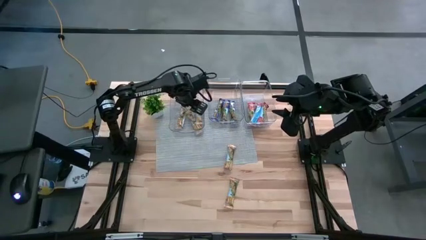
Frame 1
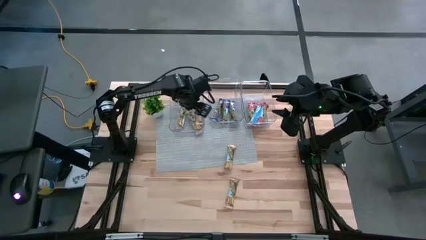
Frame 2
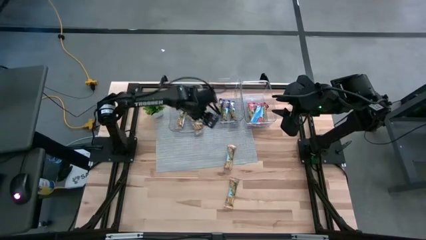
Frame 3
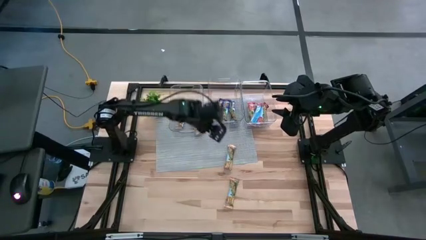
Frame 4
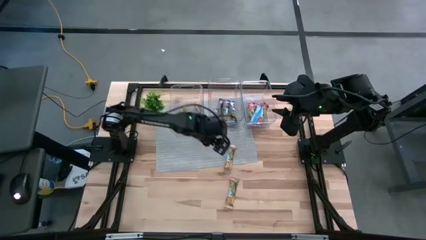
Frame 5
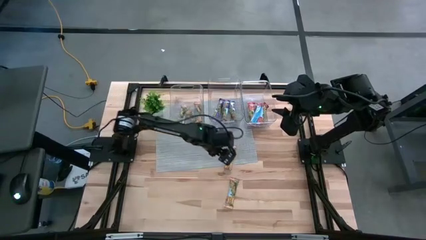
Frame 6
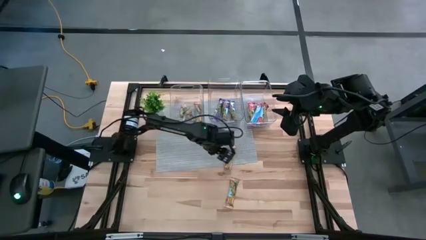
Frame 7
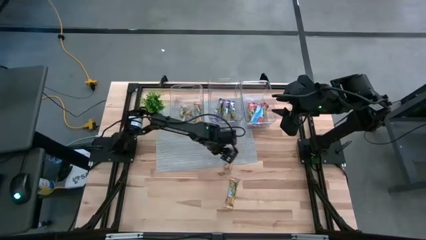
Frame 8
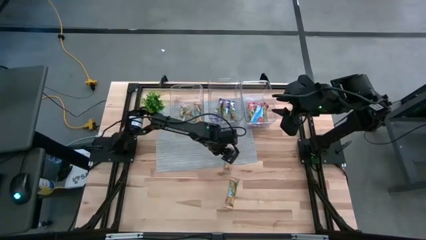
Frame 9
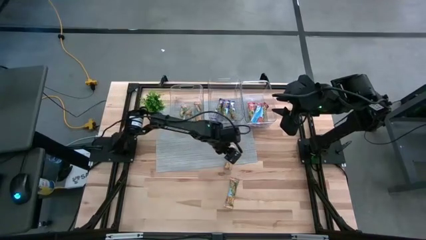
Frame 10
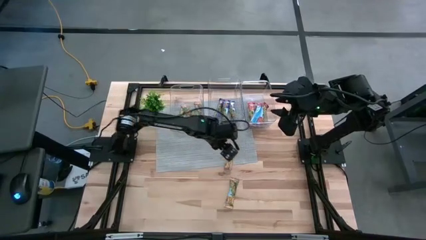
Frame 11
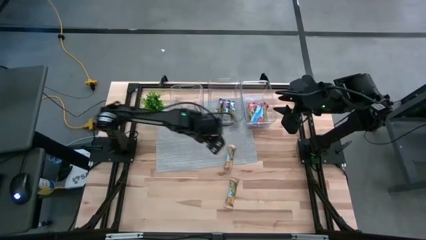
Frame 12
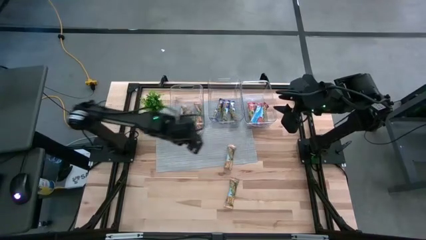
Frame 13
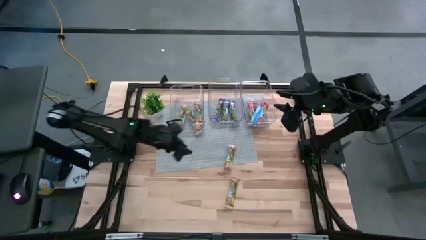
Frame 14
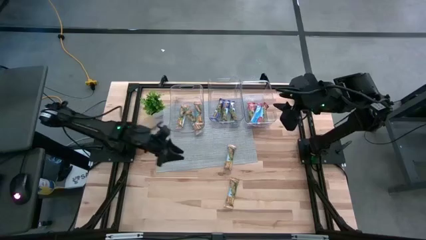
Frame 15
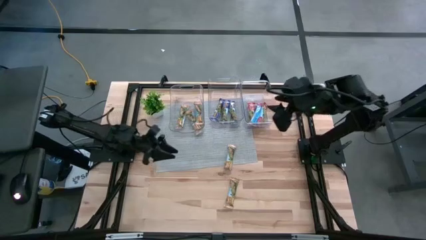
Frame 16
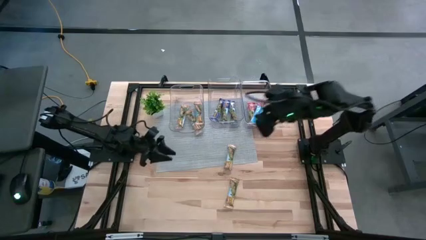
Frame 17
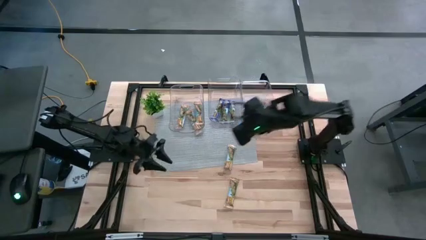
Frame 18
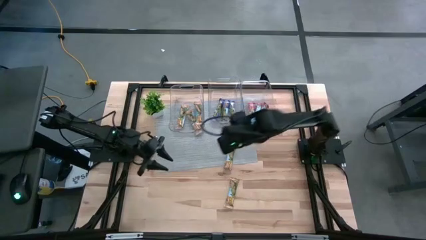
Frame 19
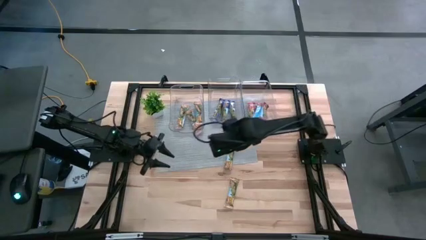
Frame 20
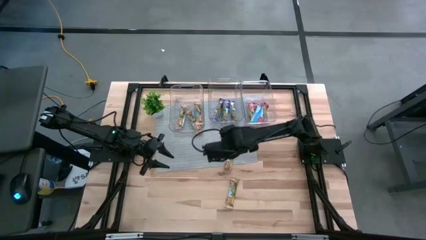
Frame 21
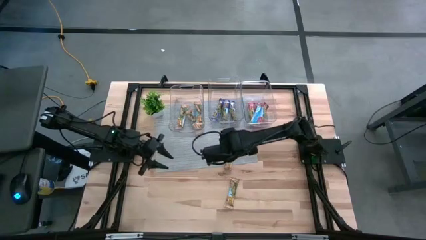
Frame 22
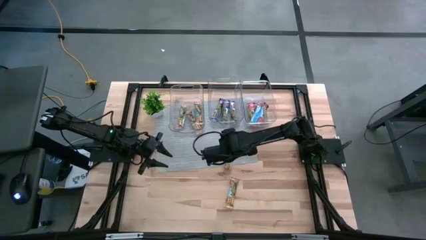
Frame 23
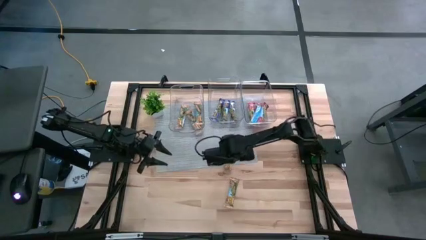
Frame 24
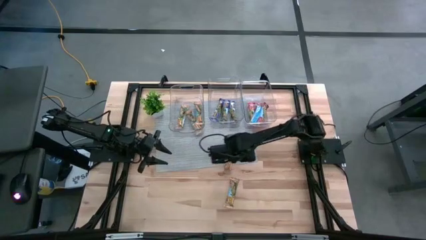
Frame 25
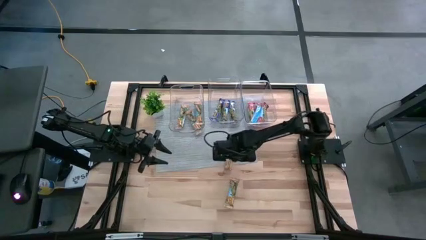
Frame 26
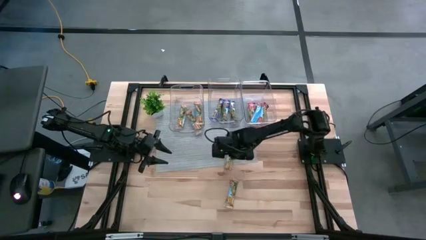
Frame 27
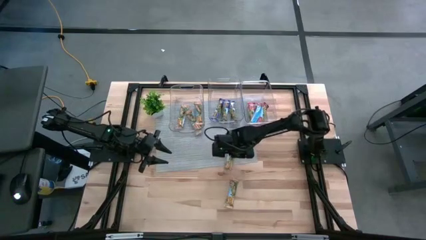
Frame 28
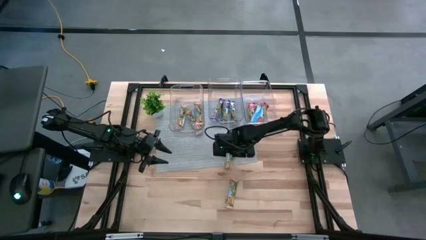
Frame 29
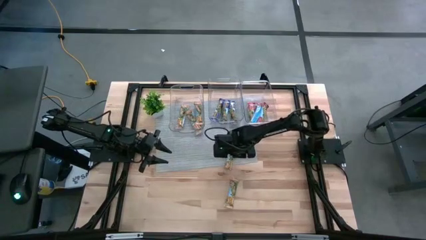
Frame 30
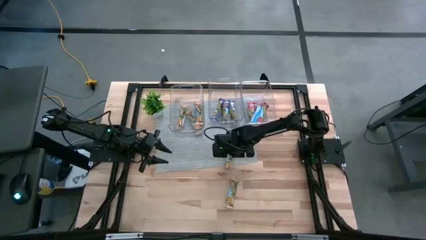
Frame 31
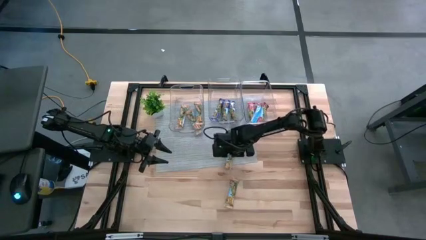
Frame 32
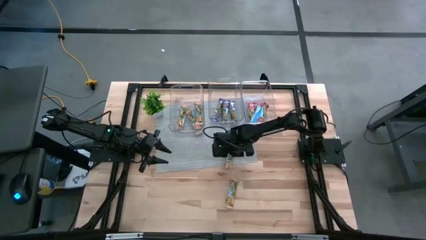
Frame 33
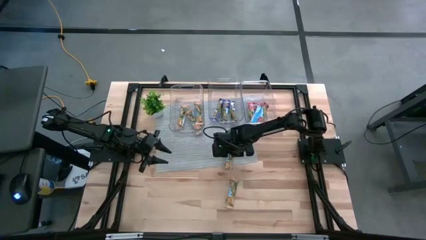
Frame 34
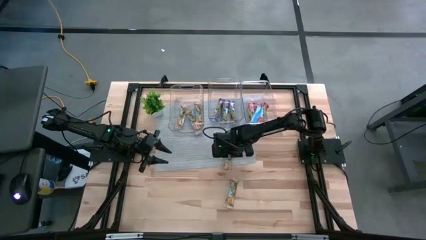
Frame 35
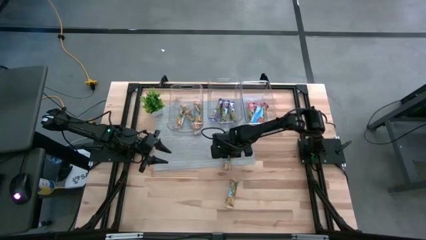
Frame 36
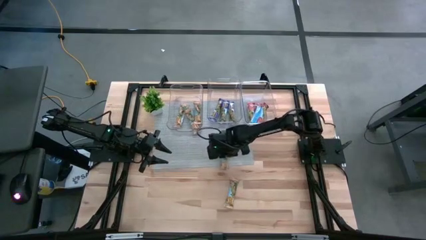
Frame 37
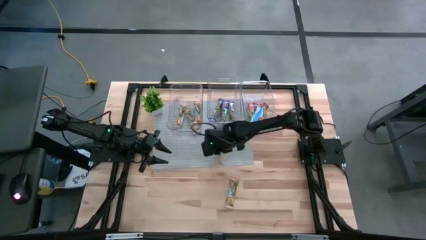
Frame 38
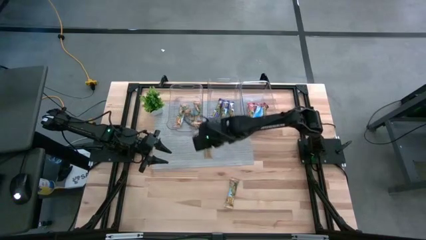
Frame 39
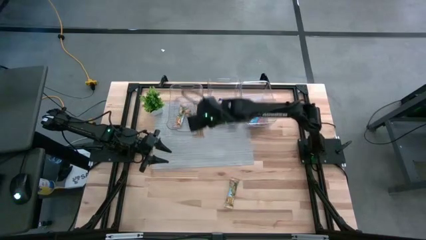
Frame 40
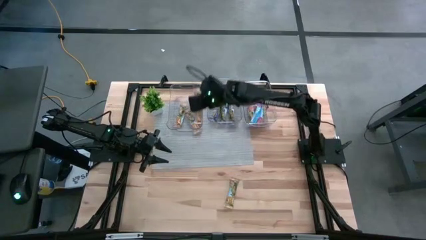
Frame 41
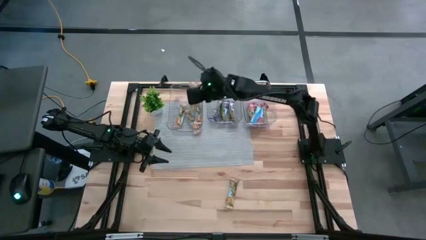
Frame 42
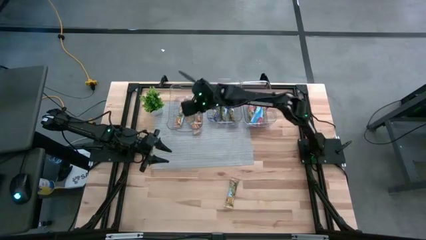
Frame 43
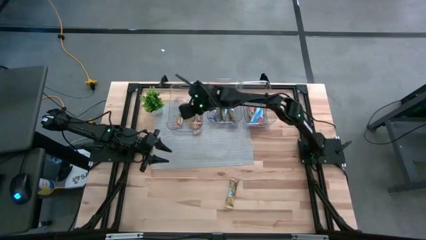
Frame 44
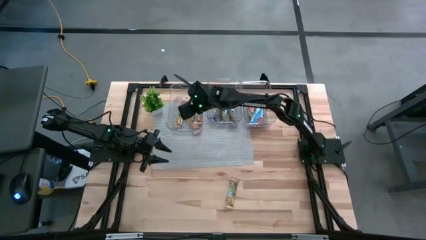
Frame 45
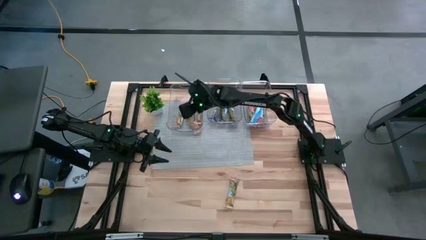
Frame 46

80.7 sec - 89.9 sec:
Task: Pick and place Granola Bars by type
Put the yellow granola bar into the left transparent bin

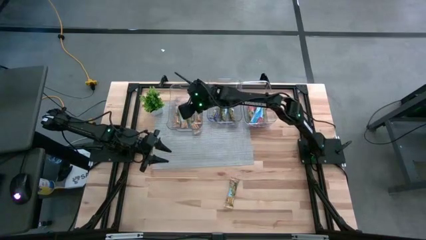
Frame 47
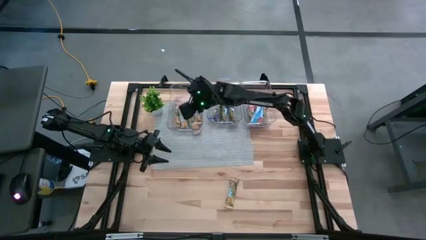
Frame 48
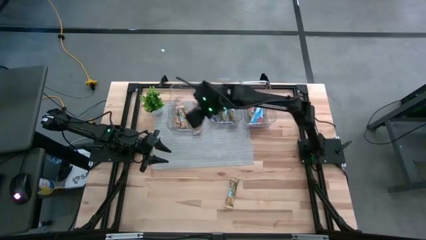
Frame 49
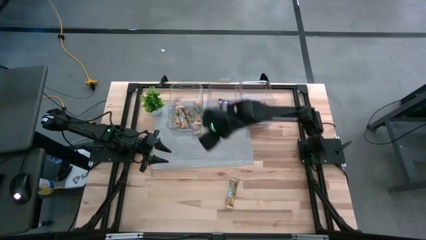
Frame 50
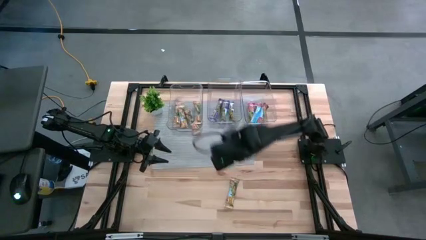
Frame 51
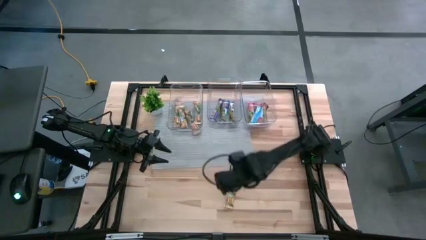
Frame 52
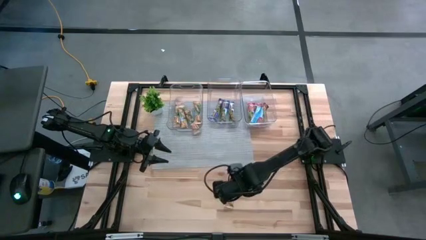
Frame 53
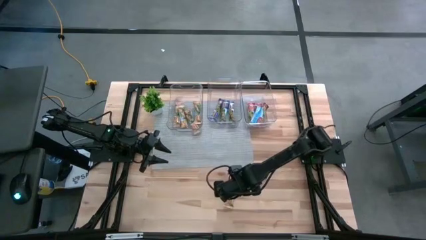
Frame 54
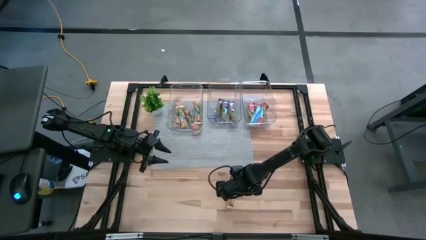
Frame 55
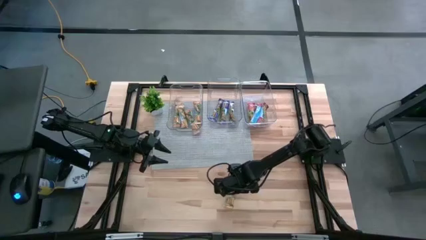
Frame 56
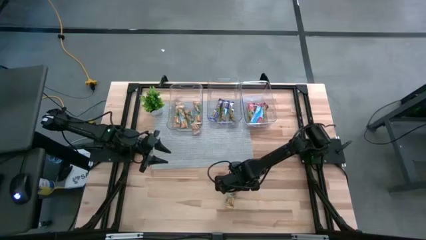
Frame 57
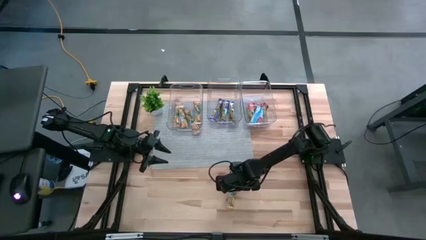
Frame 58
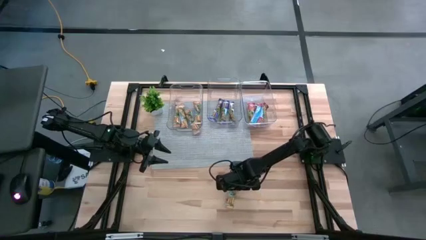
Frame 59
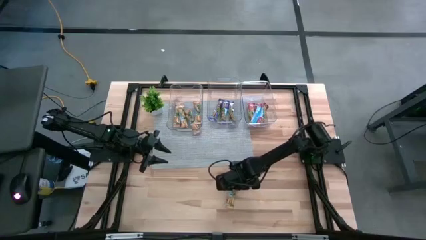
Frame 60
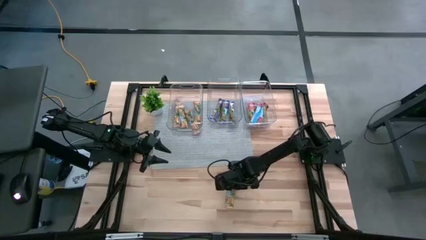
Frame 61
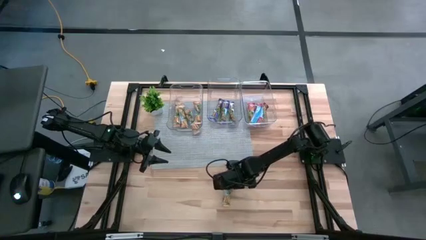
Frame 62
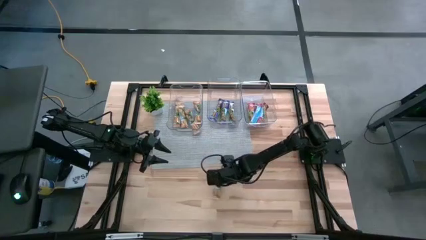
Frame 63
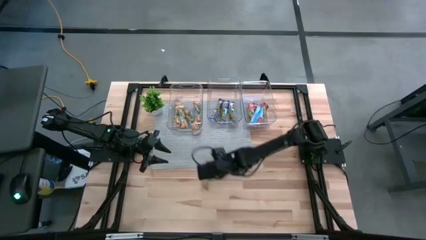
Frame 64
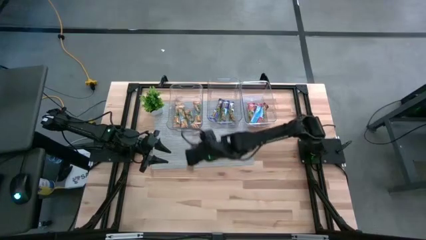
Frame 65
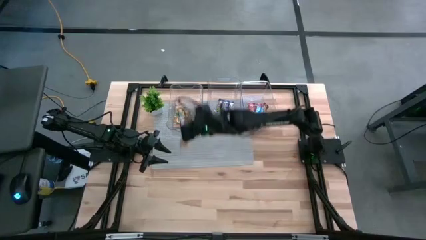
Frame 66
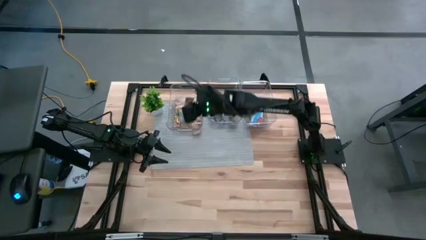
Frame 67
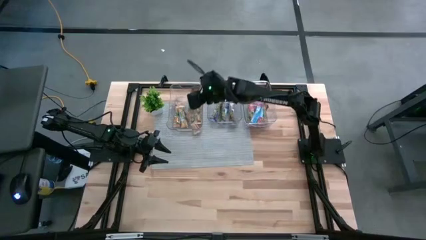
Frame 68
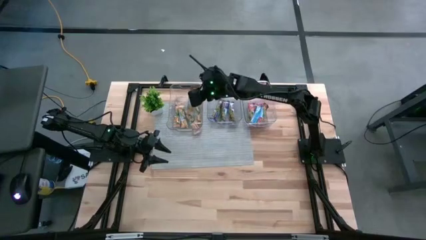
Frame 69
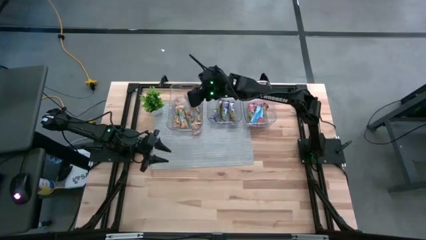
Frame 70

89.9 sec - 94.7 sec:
Put the yellow granola bar into the left transparent bin

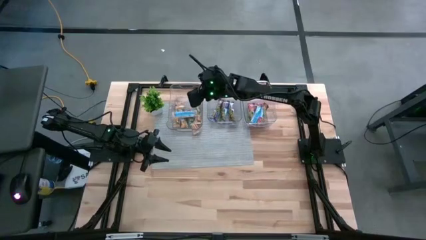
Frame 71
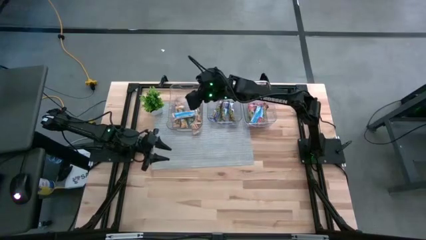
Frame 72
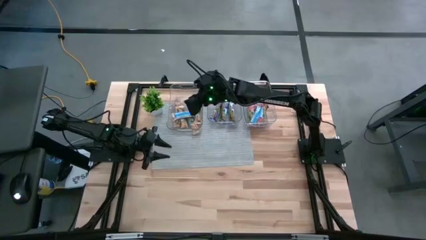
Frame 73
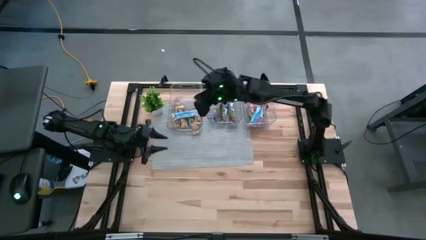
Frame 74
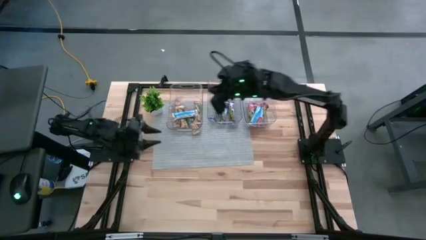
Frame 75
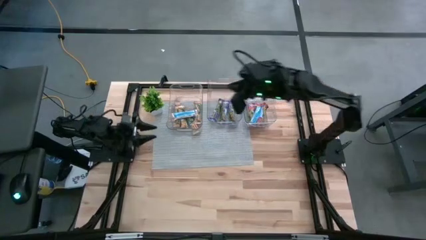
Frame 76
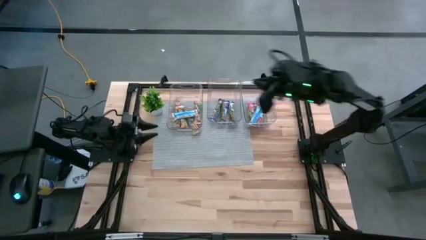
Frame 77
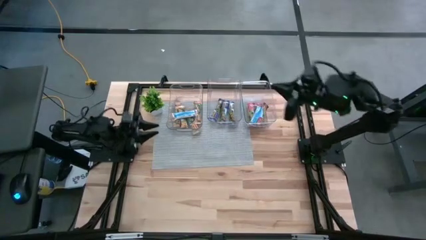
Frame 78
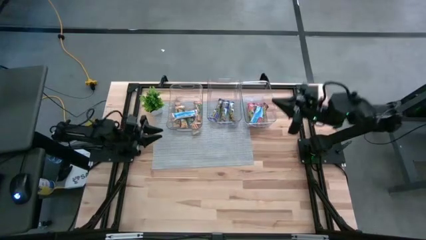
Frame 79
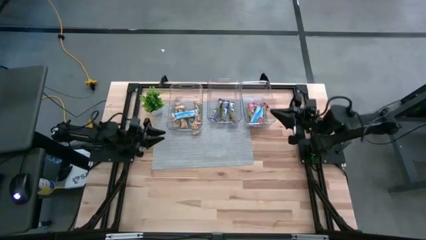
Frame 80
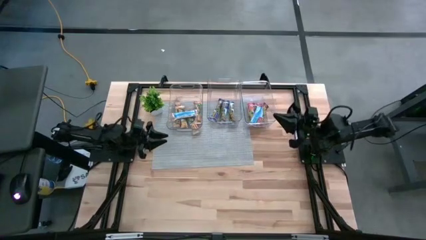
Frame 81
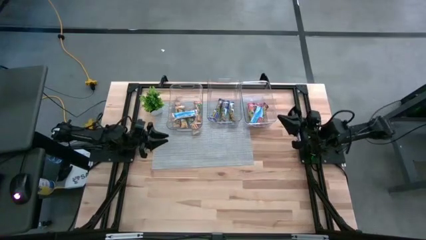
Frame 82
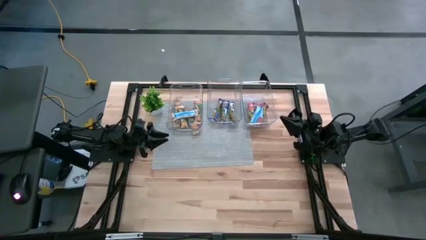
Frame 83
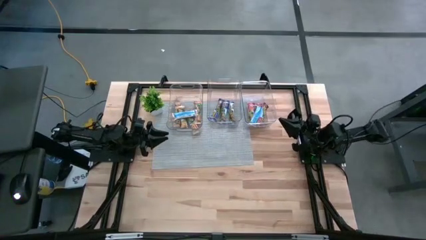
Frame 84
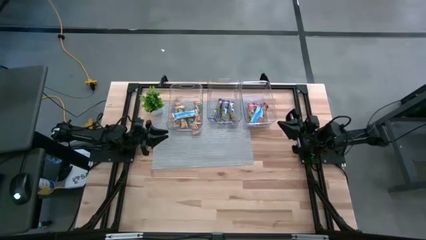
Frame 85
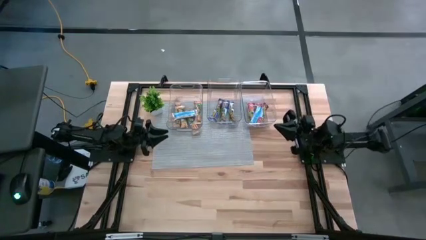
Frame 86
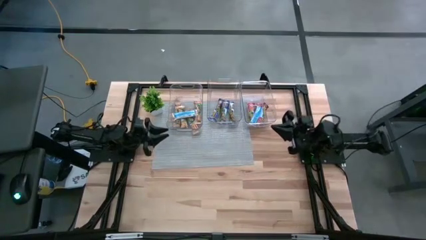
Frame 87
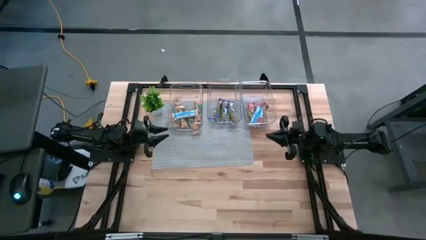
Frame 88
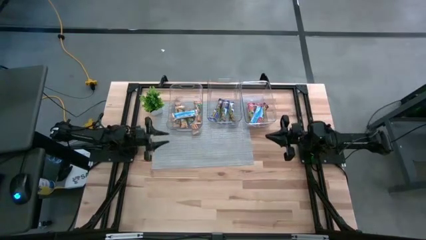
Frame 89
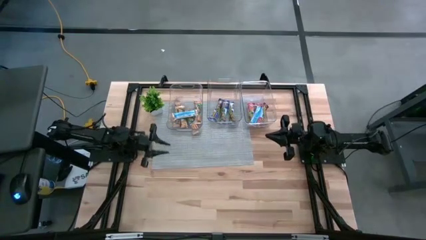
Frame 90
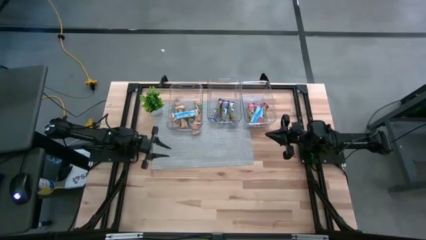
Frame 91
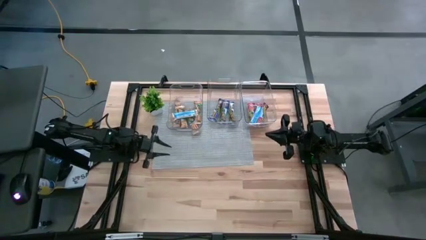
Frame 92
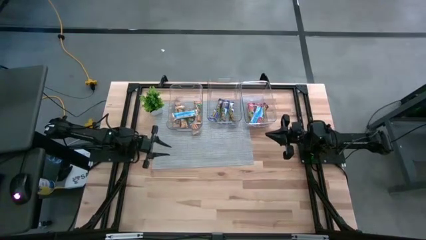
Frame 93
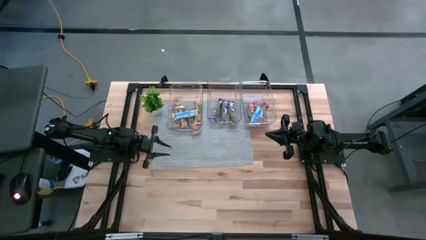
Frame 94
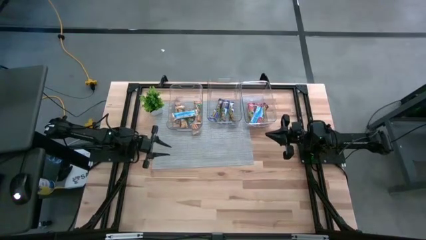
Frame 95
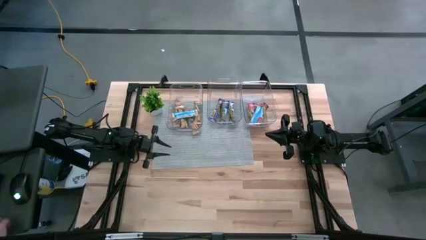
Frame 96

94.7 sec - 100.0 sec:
Return to Home Position
